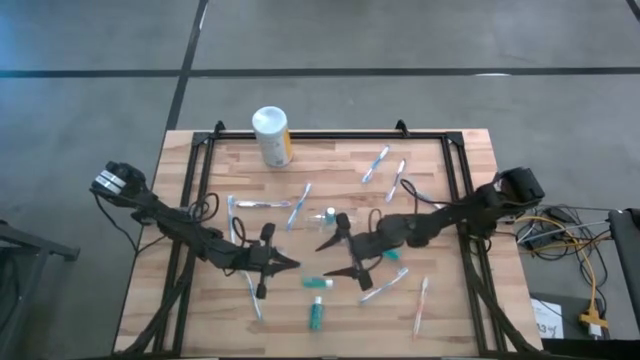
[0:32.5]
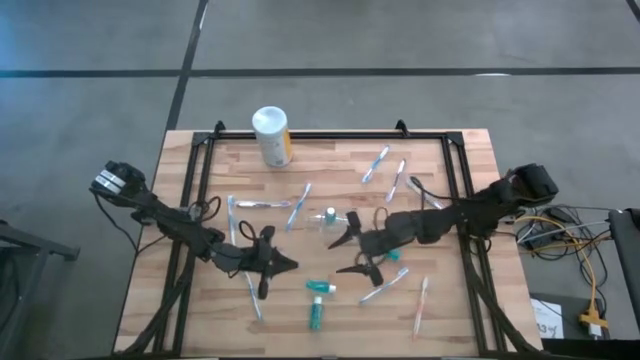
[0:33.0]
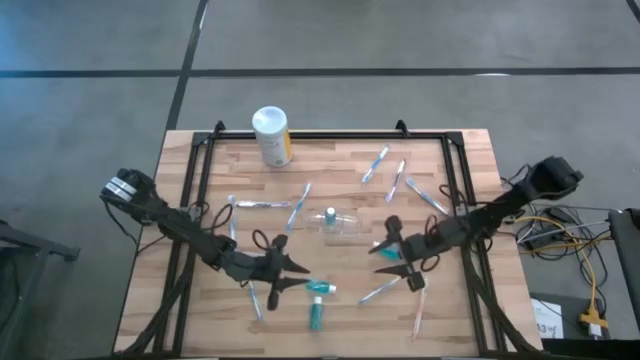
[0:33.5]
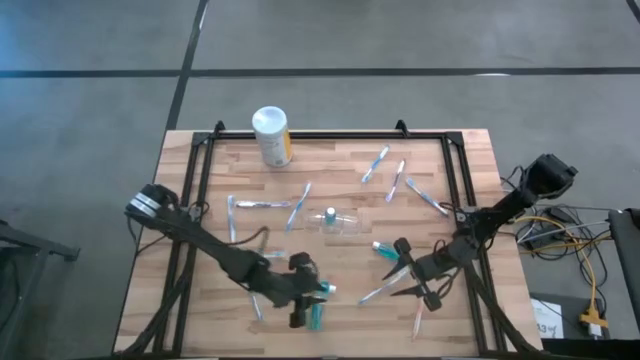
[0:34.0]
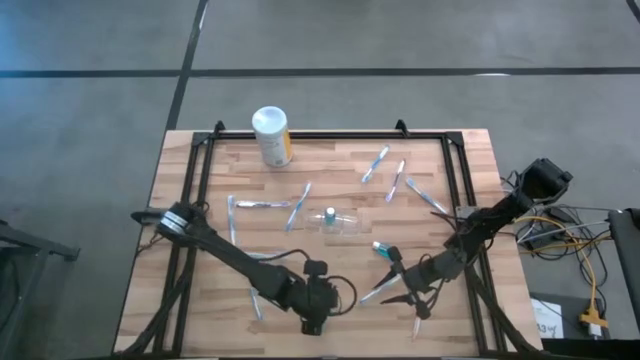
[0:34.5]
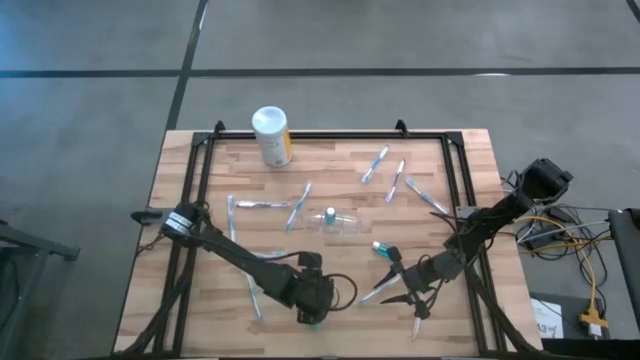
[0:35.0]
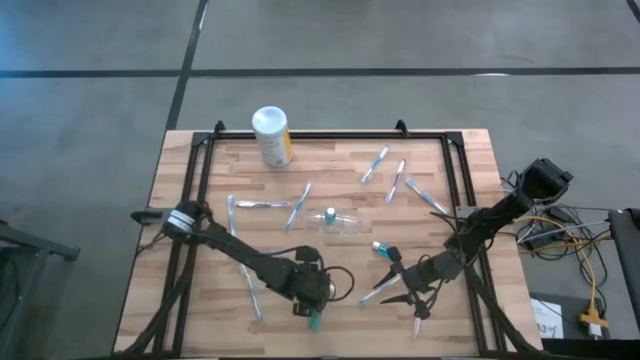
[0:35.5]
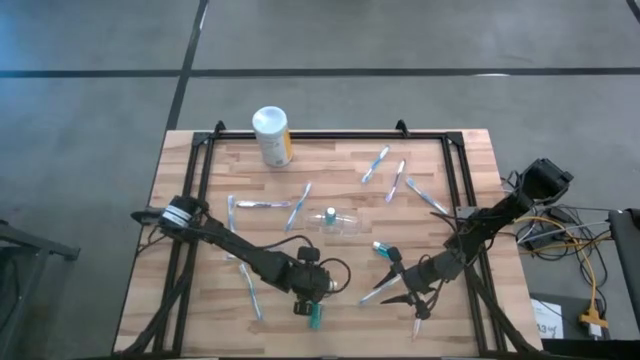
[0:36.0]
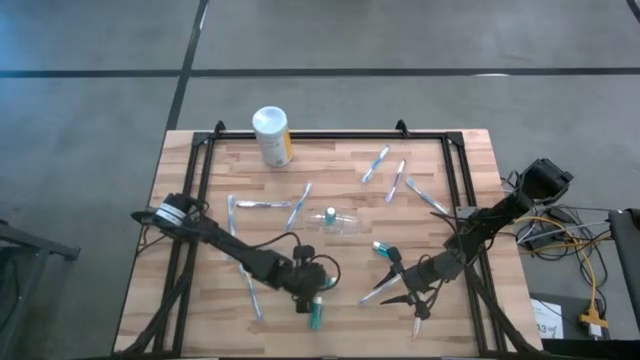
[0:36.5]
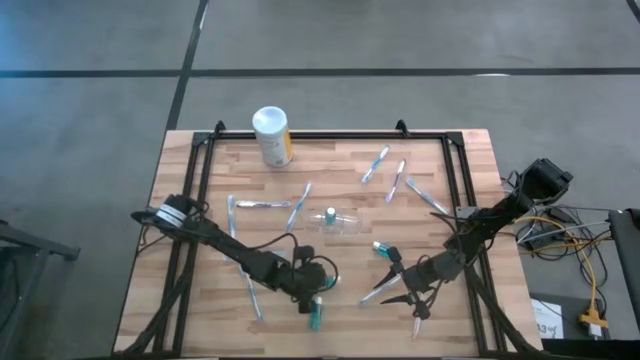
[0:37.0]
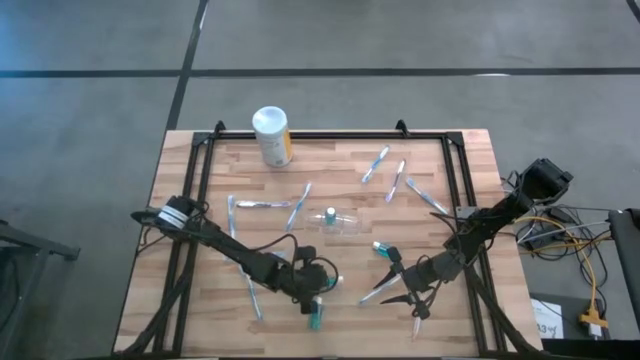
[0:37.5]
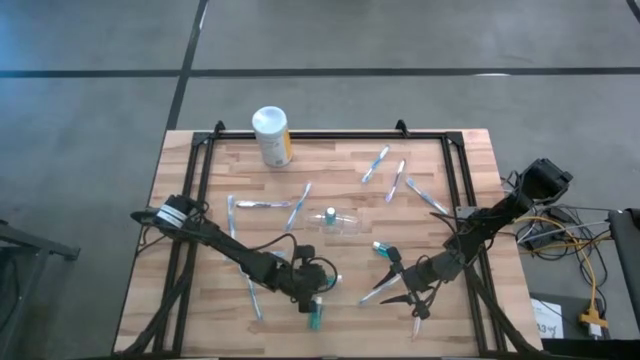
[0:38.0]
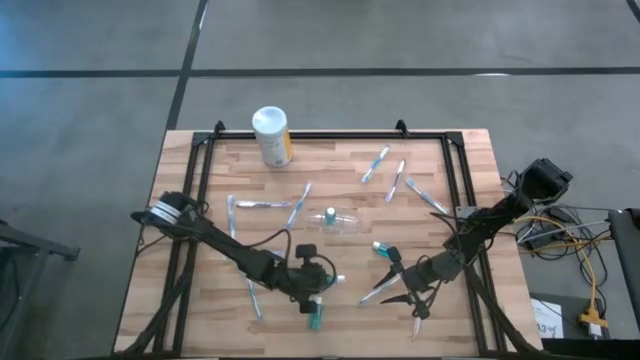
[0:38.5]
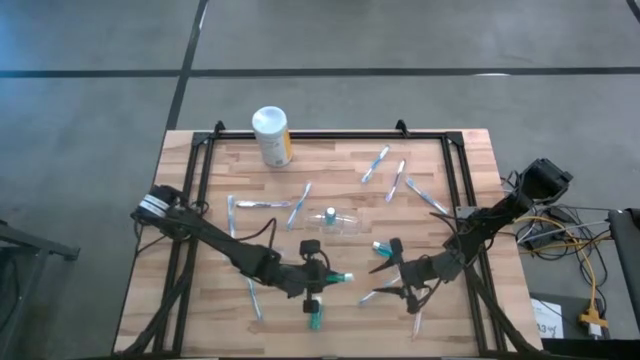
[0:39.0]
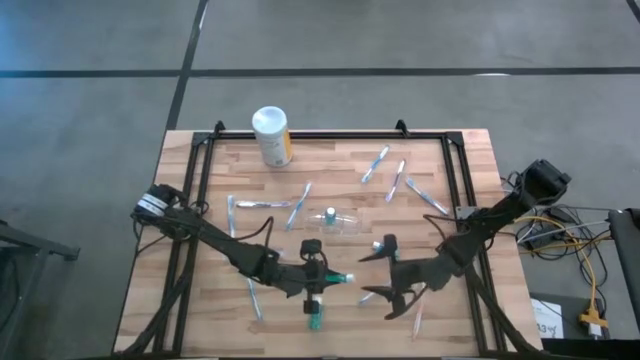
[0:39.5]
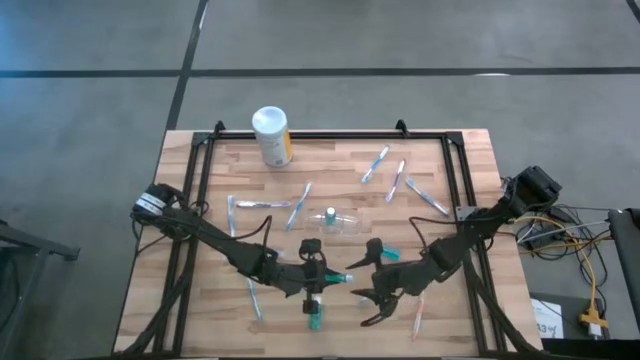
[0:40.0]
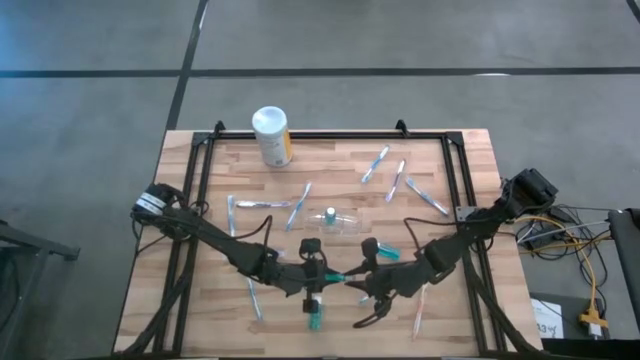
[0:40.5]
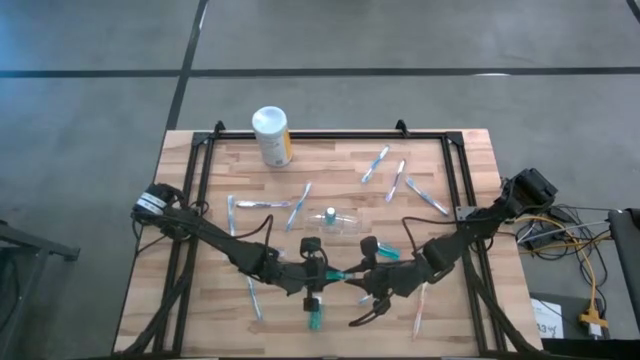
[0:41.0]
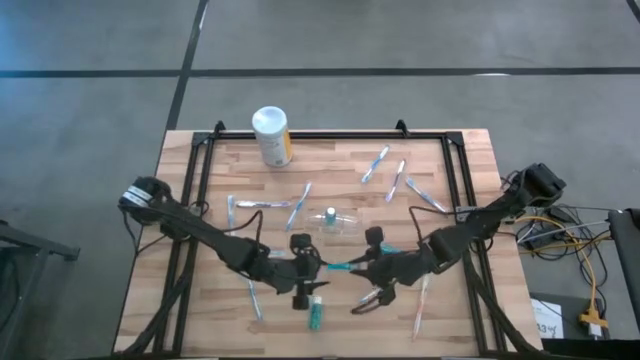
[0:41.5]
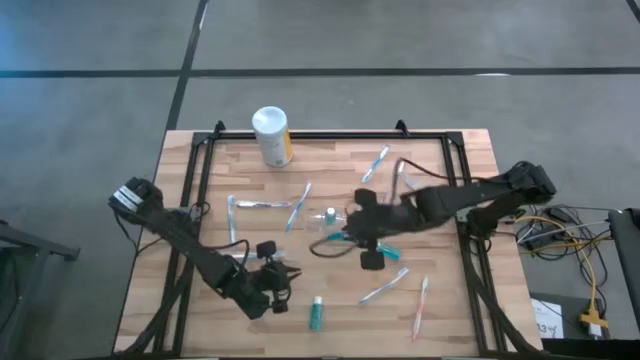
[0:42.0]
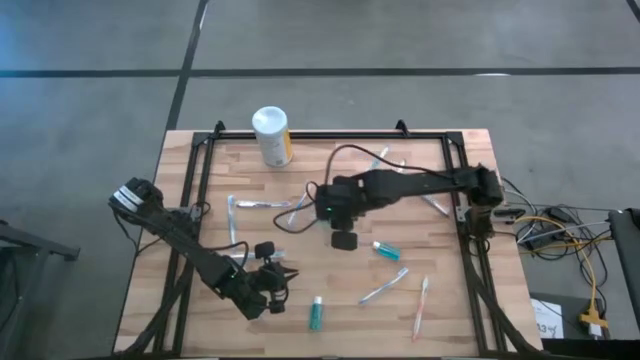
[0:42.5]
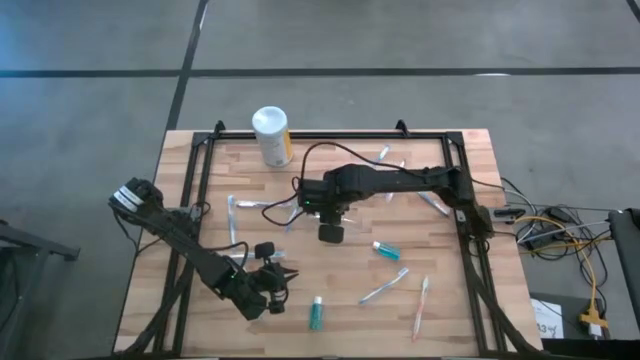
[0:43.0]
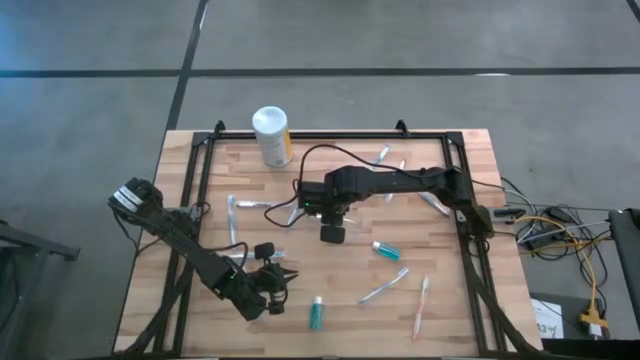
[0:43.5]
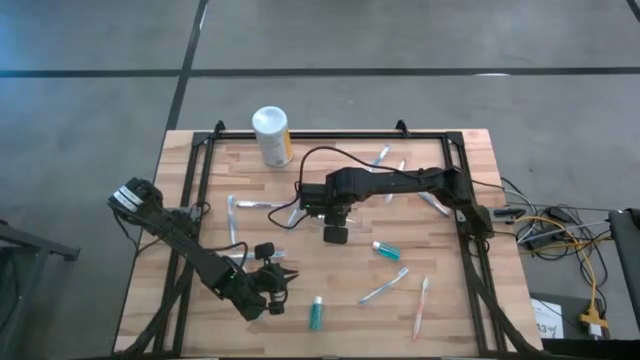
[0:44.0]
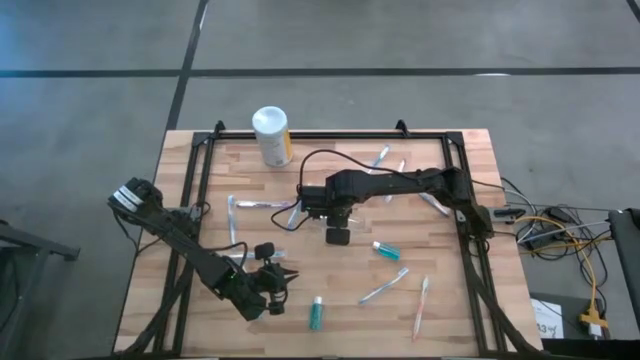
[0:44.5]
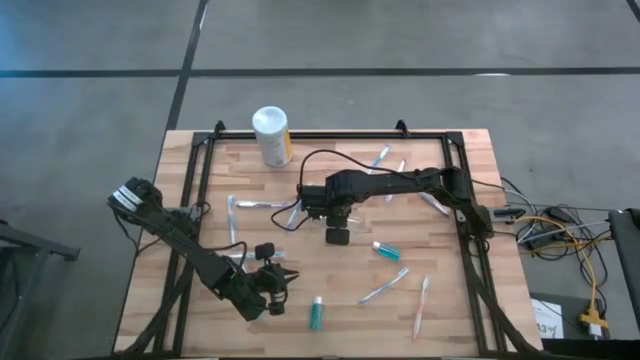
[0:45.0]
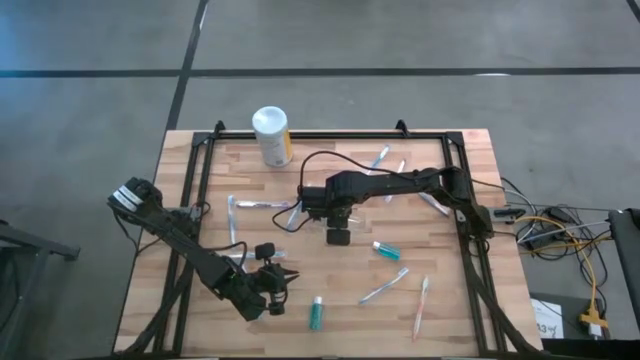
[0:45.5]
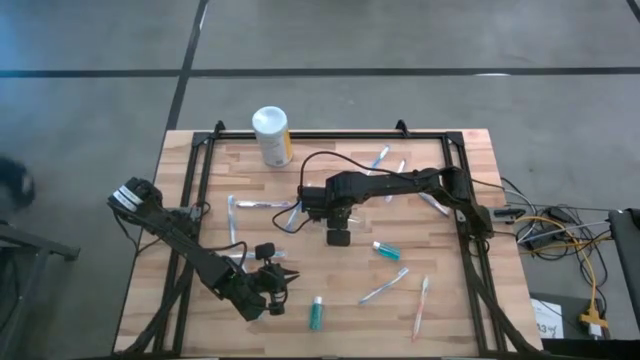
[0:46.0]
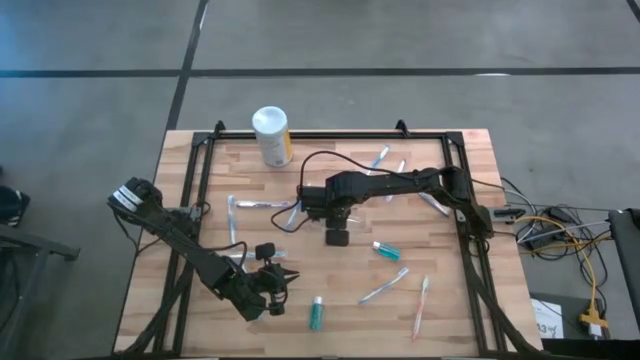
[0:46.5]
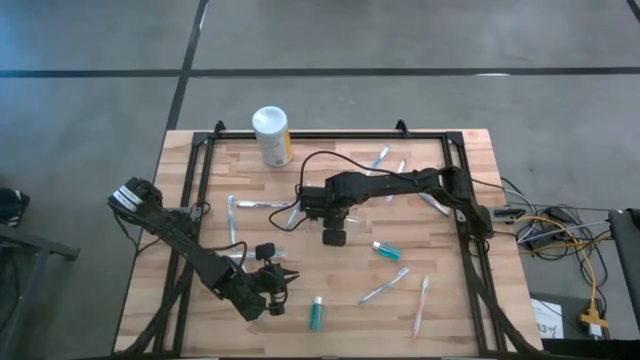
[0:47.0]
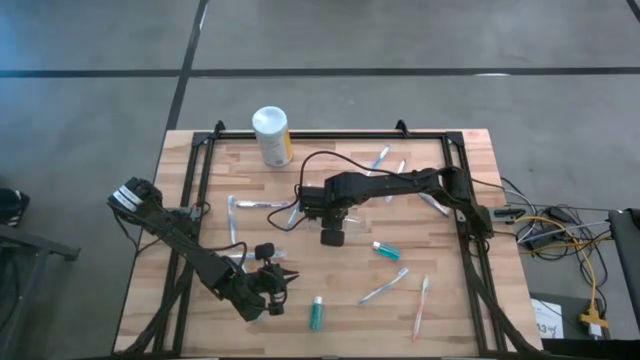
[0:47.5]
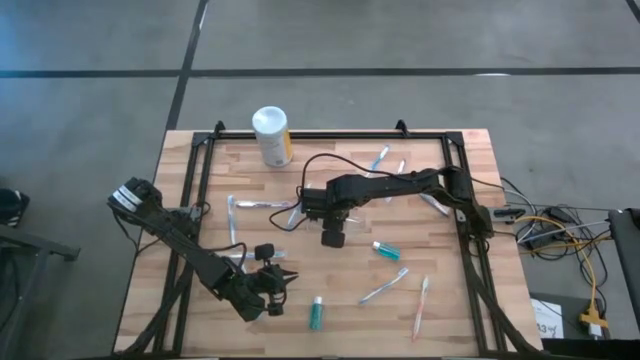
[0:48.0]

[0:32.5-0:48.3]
Task: Pick & Place toothbrushing station
Put the mouthwash into the transparent organizer

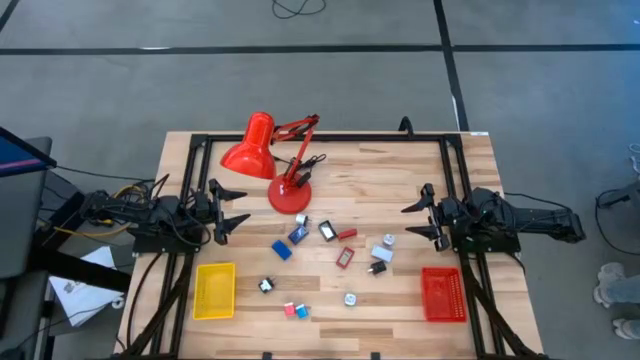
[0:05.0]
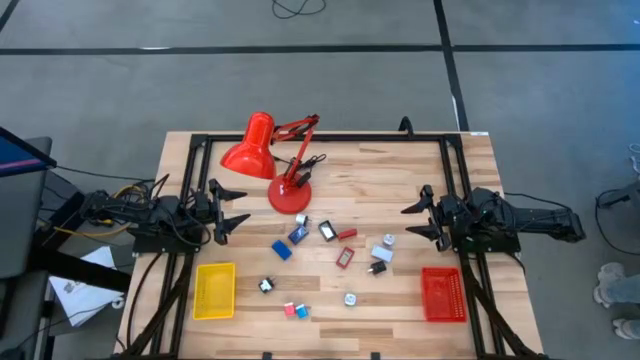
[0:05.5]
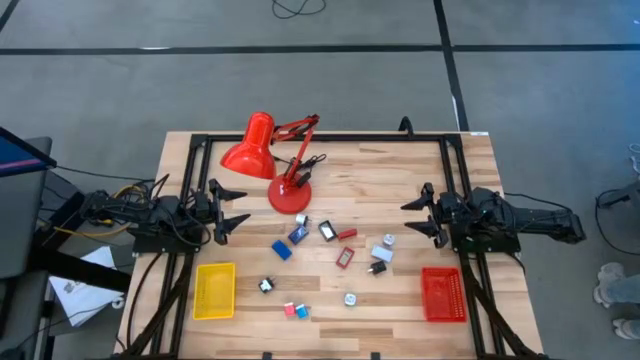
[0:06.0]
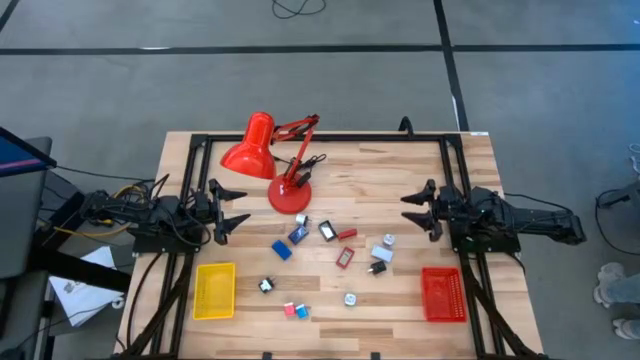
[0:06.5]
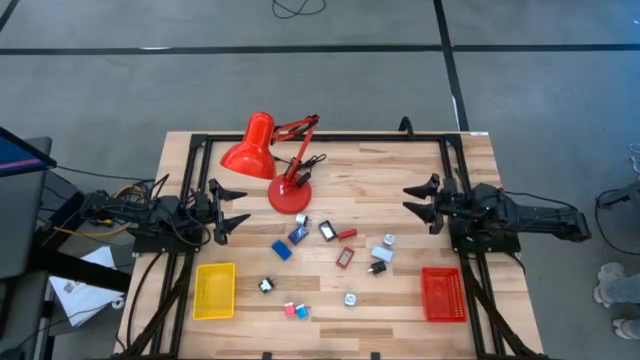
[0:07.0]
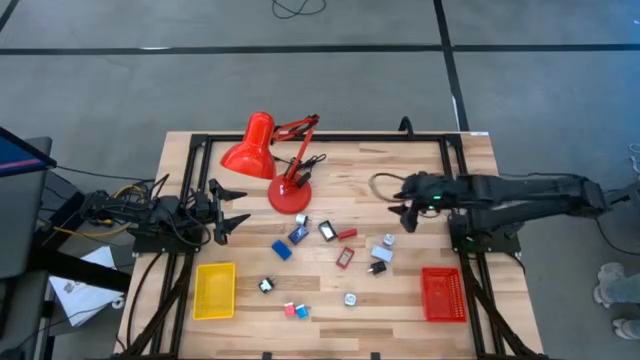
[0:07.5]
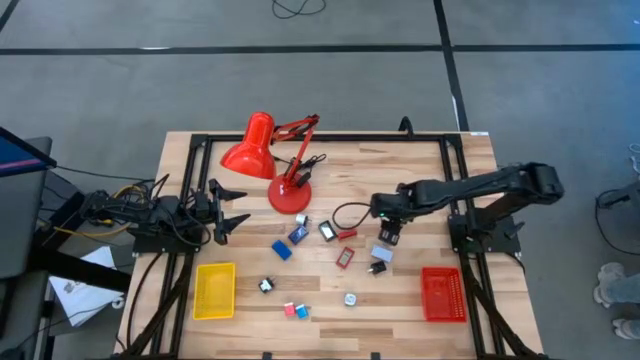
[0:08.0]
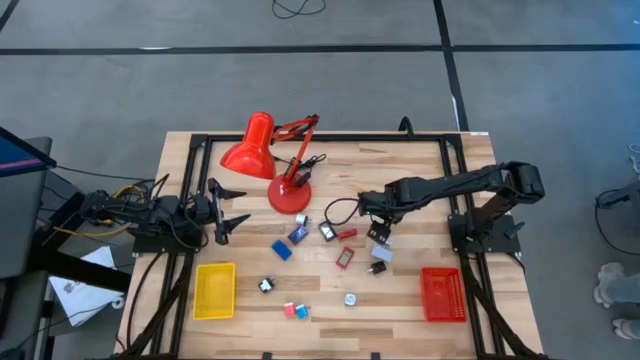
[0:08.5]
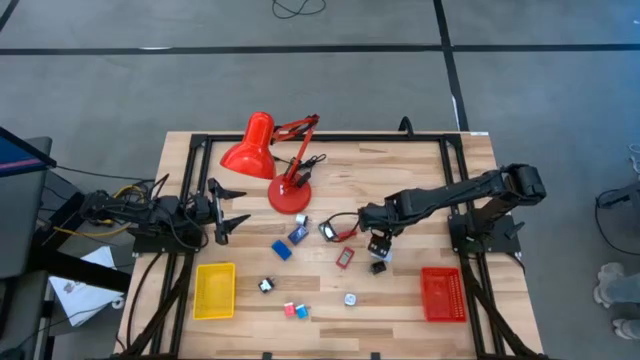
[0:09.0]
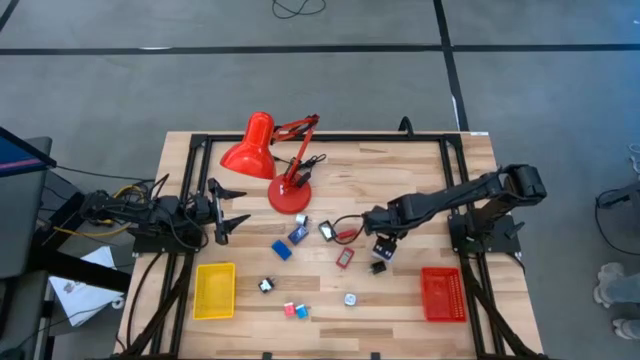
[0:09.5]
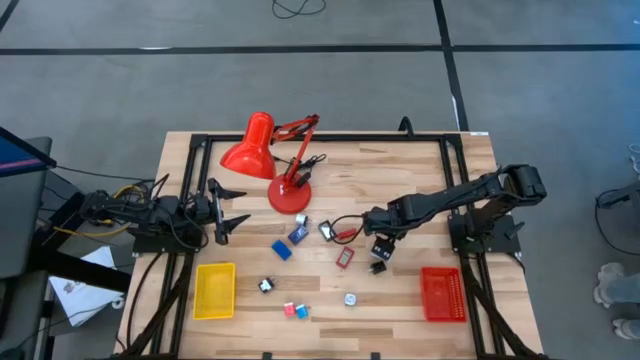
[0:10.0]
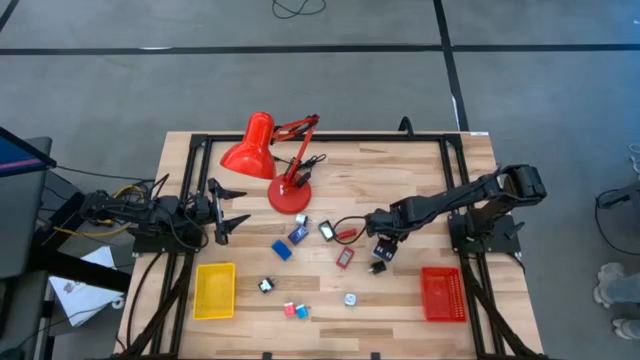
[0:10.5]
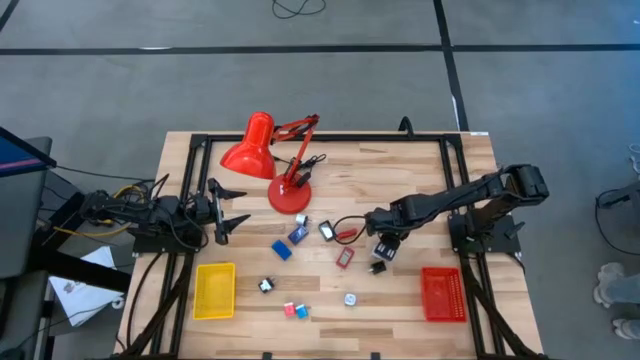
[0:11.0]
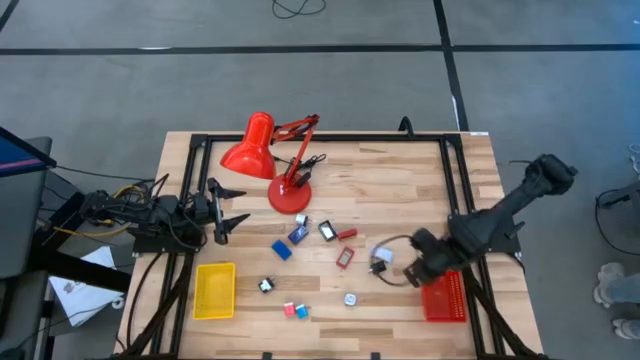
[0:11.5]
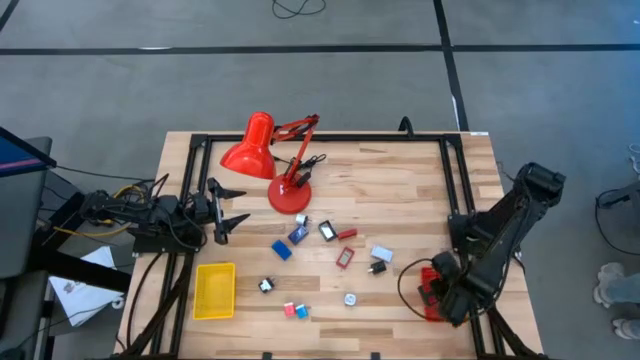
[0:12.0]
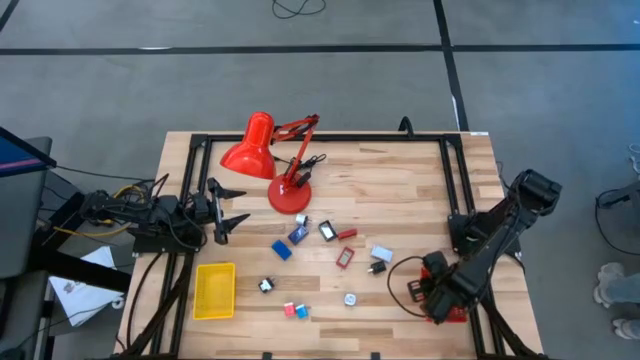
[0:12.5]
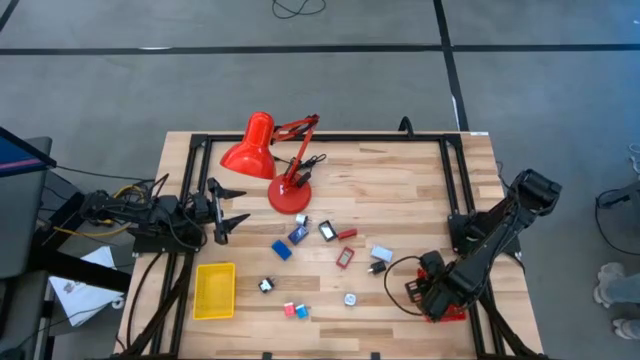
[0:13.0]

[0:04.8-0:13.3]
Task: Pick & Place Office items
Put the purple charger adapter into the red bin
